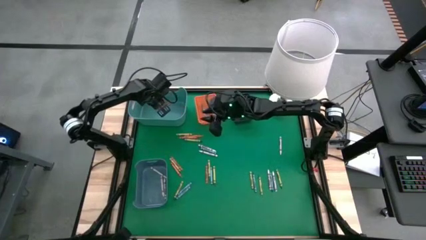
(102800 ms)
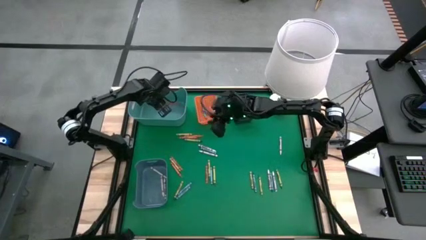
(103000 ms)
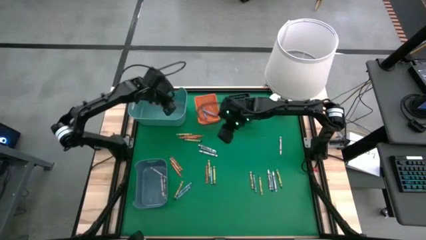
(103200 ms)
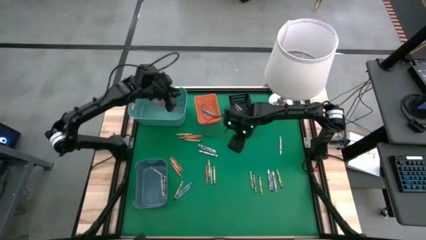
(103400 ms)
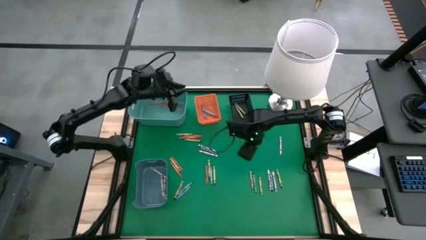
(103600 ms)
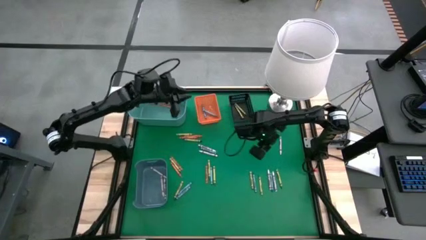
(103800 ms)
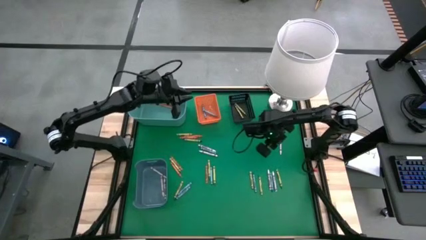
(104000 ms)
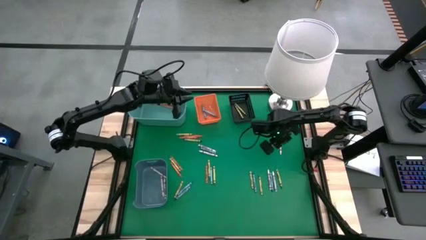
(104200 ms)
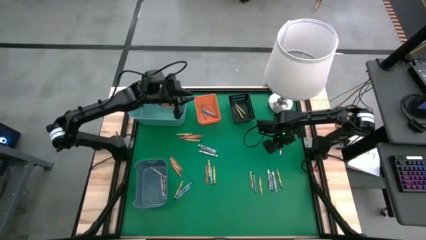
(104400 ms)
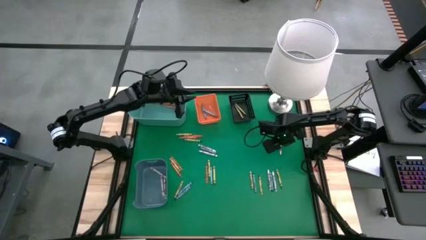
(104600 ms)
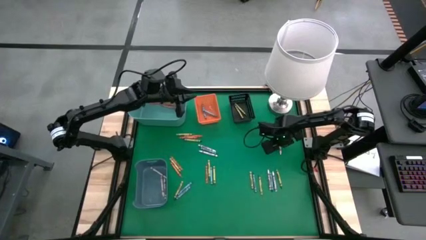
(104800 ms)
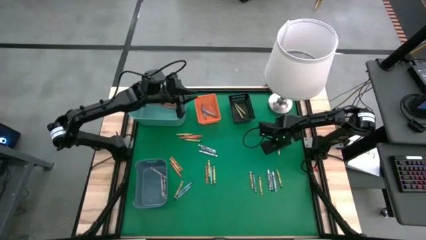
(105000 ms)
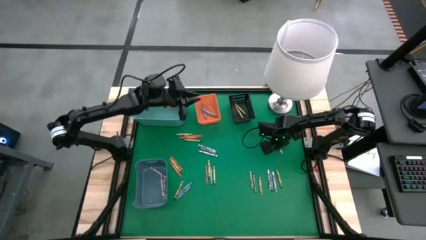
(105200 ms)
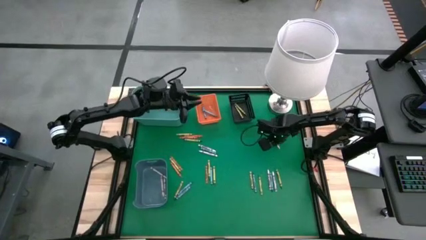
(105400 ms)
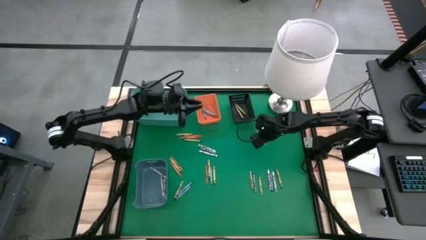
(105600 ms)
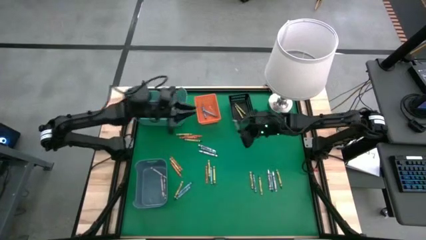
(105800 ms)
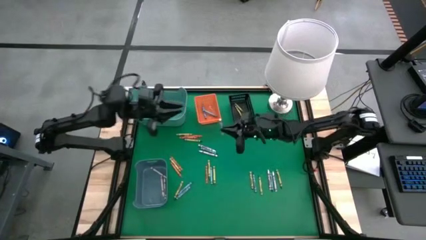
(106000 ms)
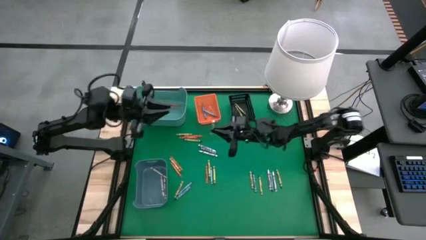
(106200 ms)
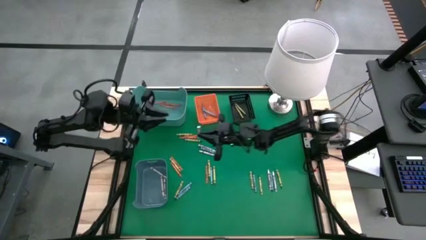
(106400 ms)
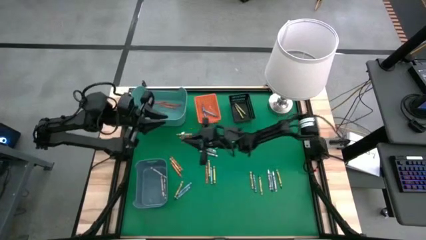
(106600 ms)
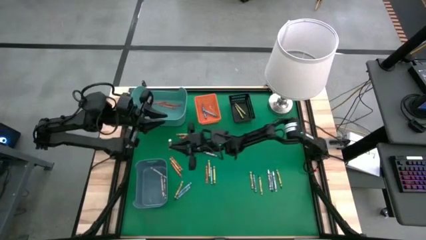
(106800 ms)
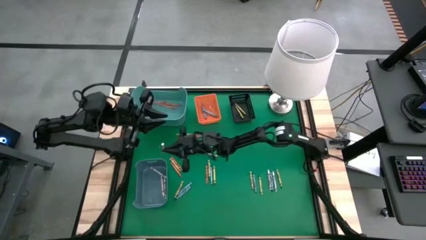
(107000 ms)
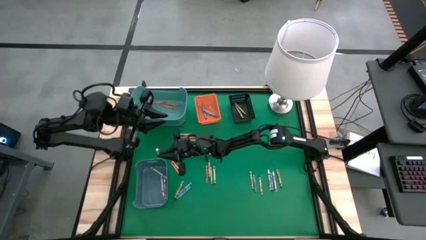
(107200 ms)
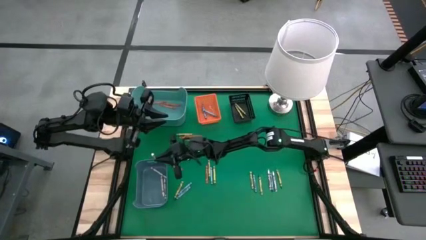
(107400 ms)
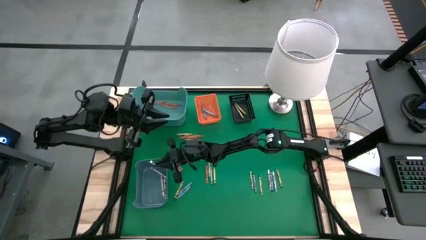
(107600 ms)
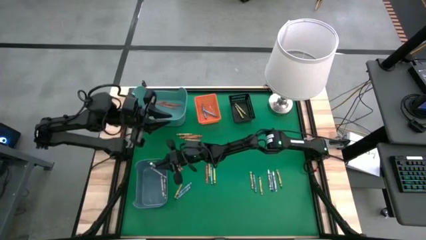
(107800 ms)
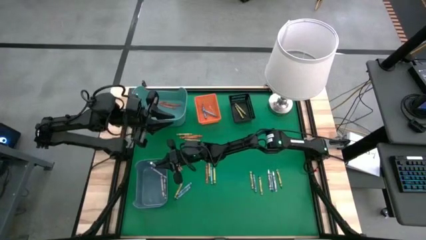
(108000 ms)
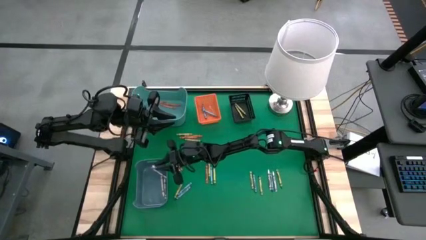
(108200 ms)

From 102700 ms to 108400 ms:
Task: Sort crayons
Put the white crayon into the blue bin

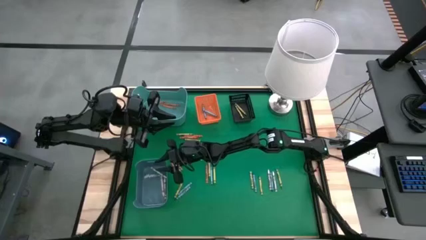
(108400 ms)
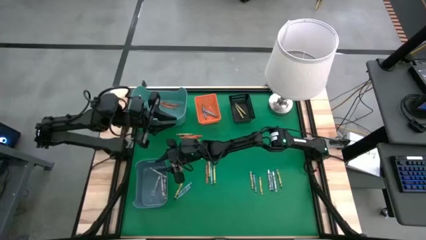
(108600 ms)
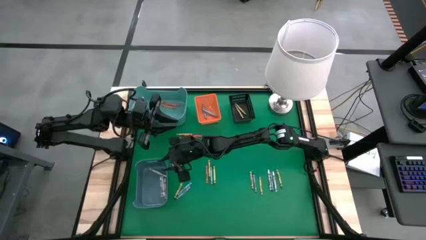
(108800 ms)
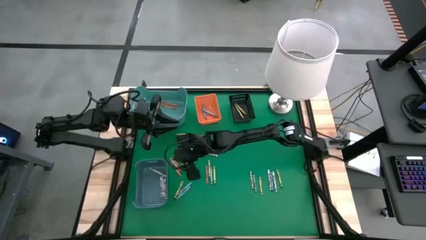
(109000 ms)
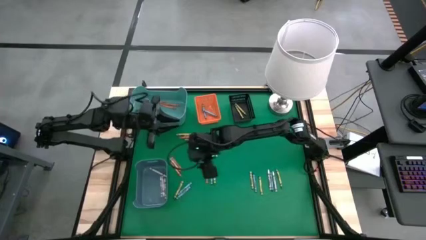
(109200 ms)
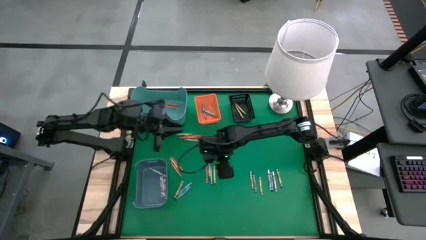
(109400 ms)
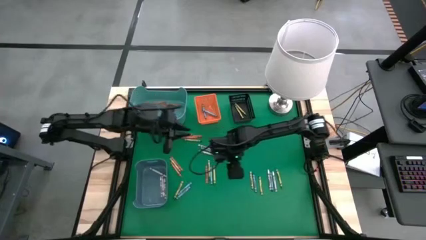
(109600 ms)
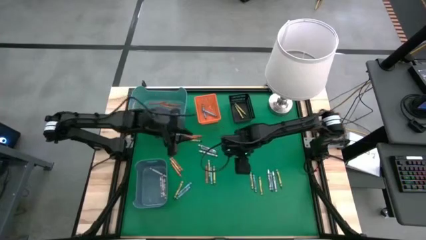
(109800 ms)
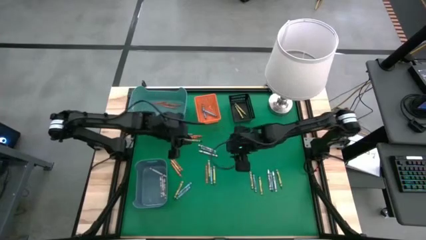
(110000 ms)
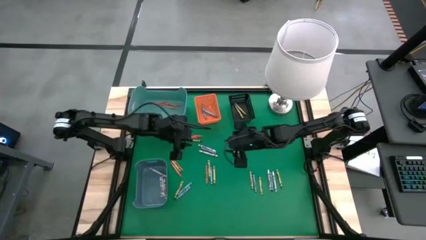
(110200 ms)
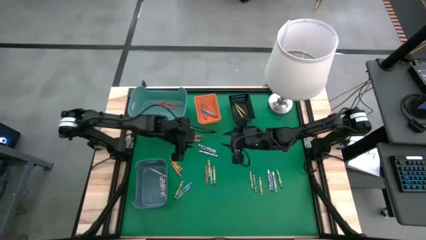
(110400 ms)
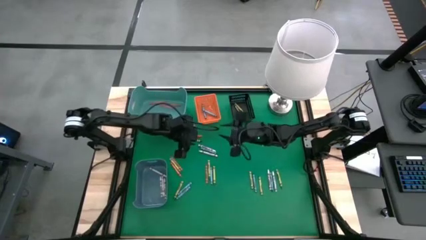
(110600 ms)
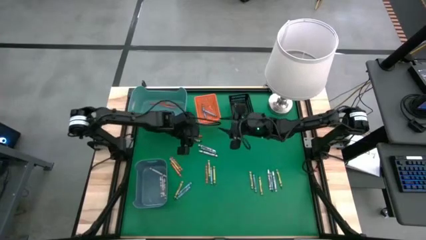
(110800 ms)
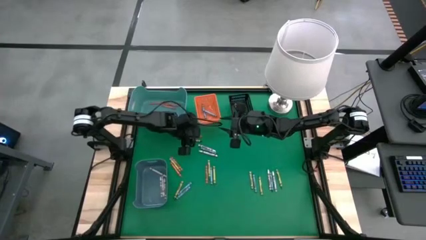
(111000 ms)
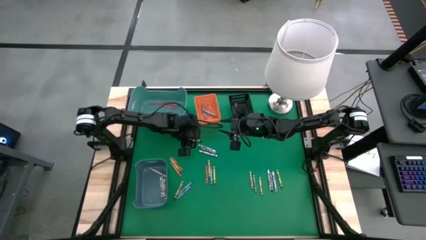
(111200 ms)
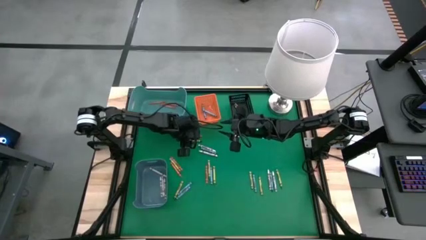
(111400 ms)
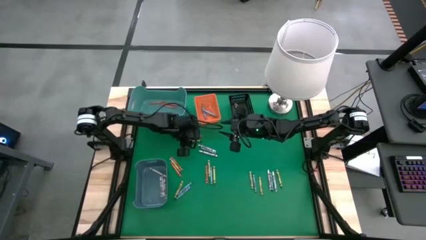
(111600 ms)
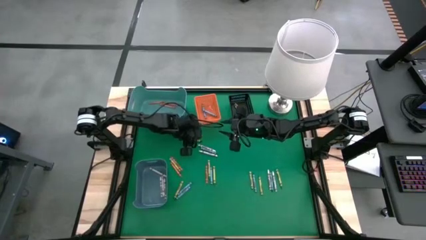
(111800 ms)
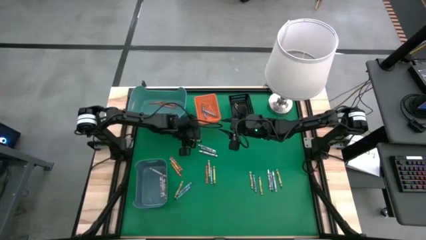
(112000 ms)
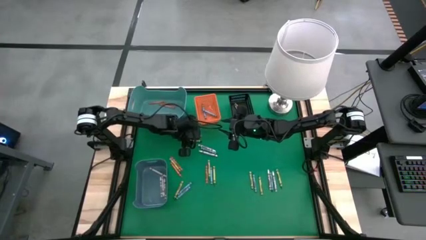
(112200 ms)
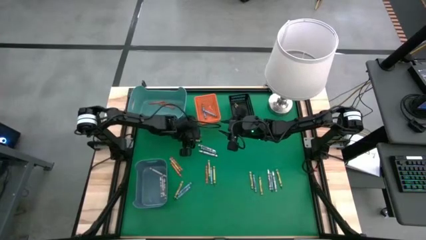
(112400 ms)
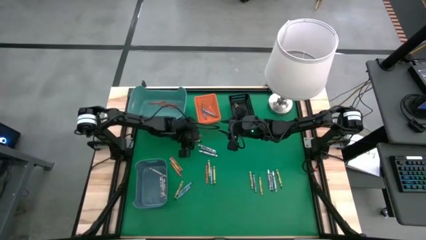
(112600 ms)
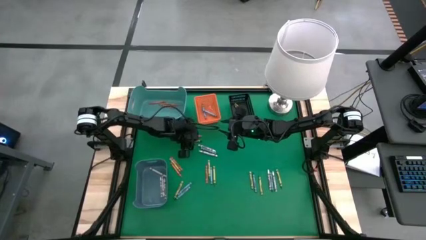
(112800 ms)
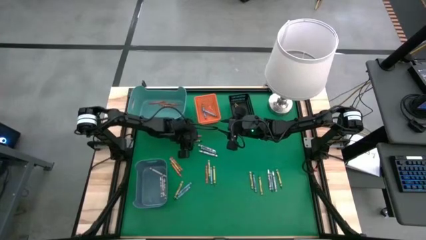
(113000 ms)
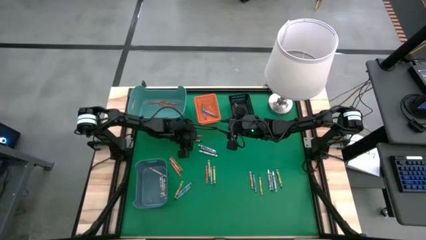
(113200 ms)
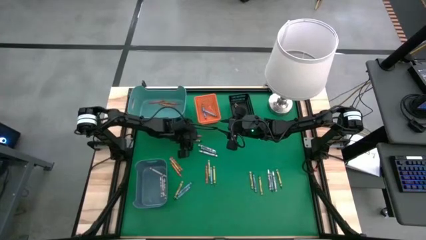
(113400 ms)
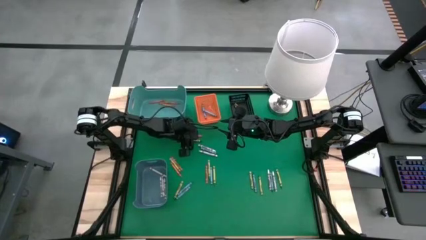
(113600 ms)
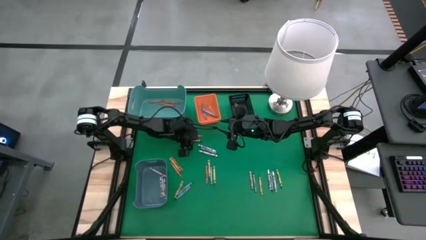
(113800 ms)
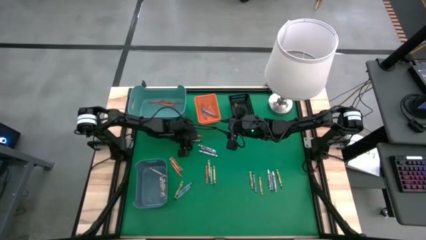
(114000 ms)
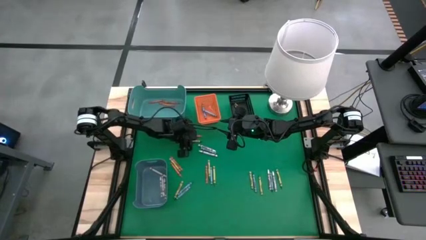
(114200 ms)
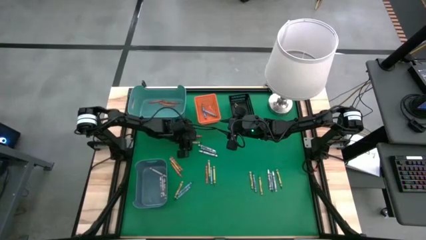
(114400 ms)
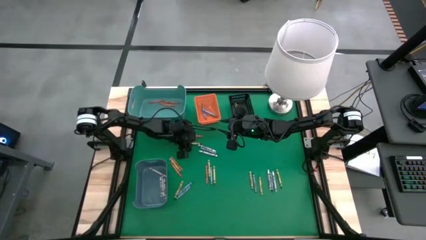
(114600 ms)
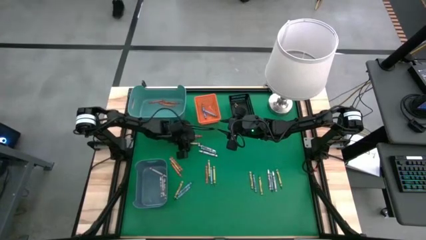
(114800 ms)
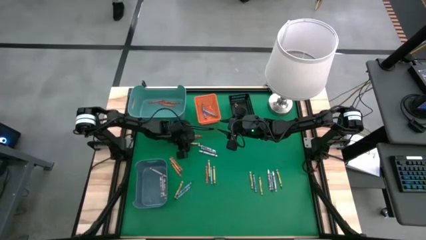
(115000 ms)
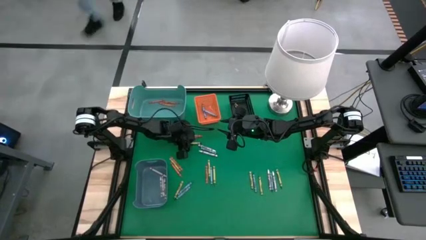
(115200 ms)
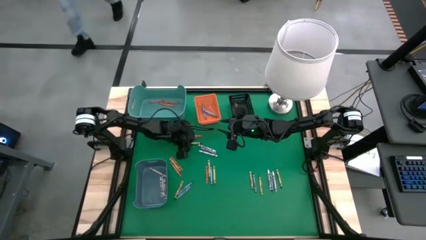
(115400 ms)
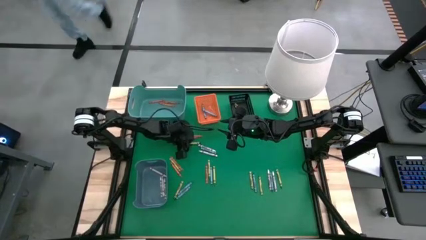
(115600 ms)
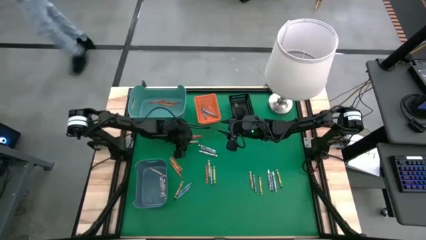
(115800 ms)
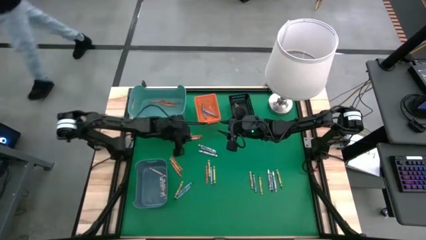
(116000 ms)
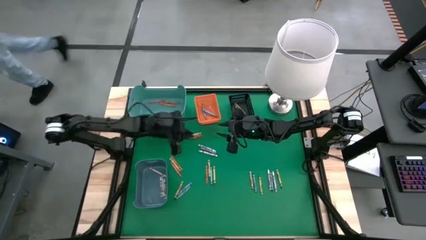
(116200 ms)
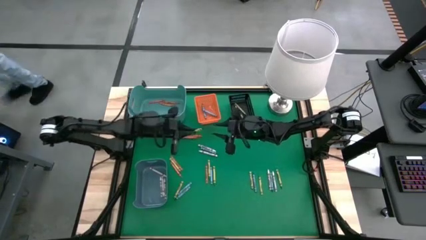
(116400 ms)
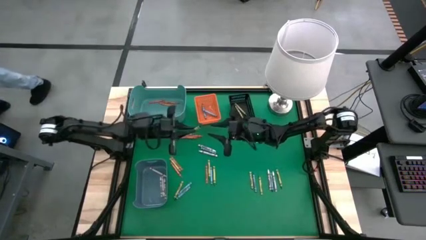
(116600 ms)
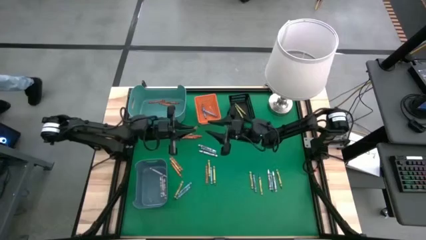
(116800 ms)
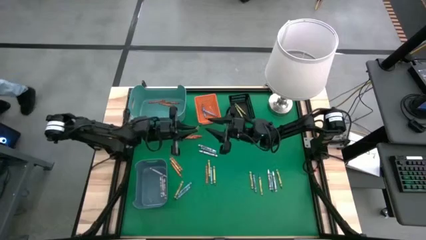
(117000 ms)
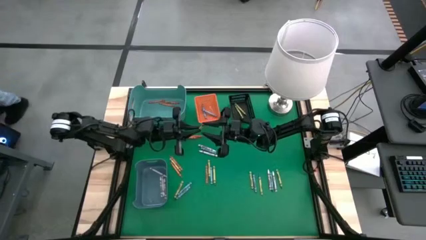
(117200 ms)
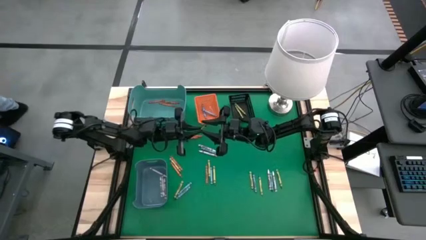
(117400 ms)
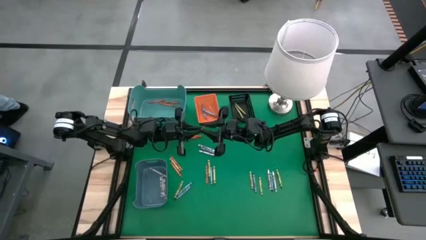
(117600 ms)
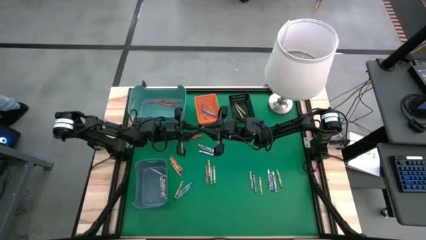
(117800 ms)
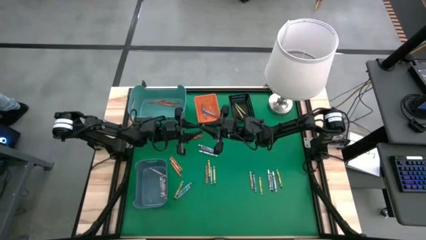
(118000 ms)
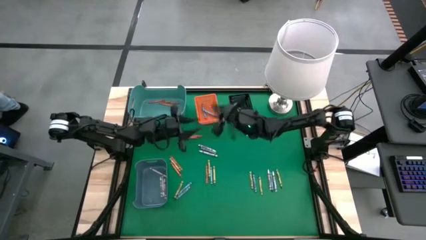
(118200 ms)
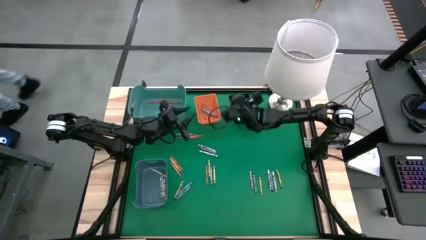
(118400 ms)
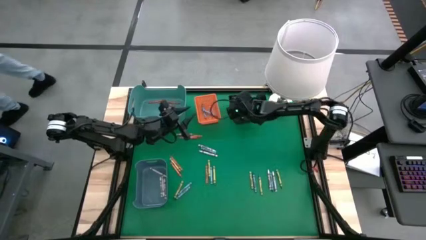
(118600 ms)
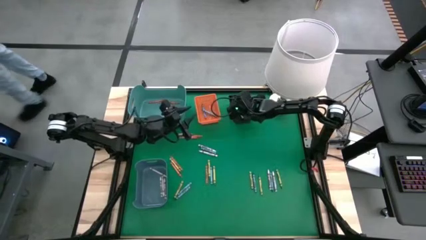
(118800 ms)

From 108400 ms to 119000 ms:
Put the green crayon into the black bin
